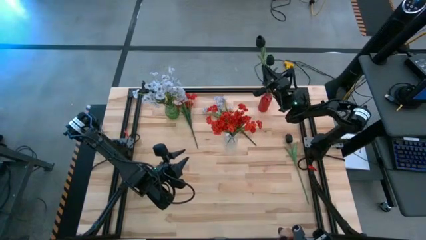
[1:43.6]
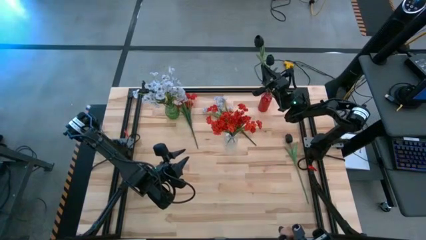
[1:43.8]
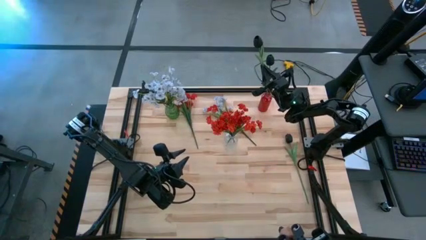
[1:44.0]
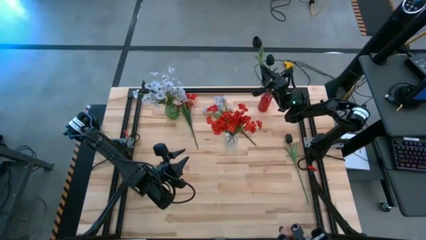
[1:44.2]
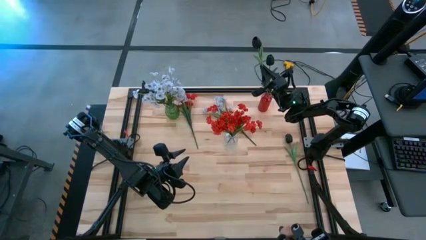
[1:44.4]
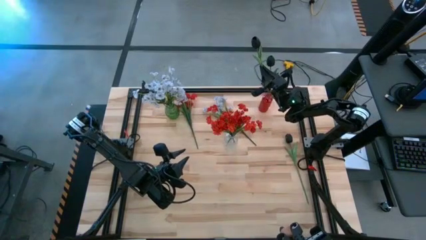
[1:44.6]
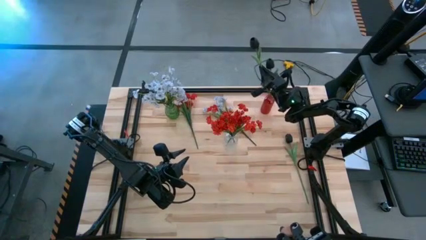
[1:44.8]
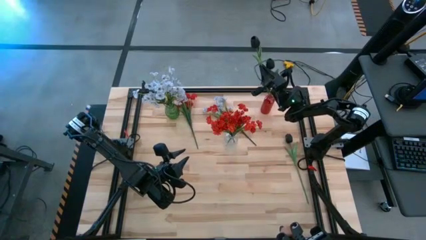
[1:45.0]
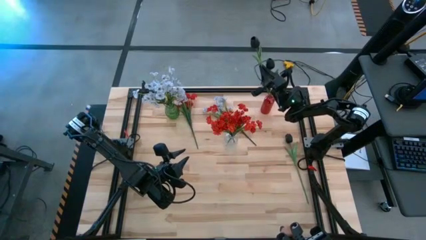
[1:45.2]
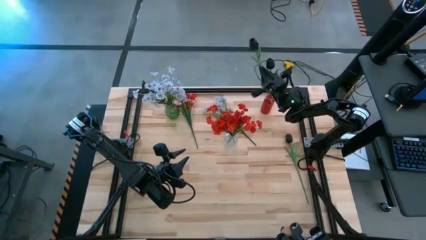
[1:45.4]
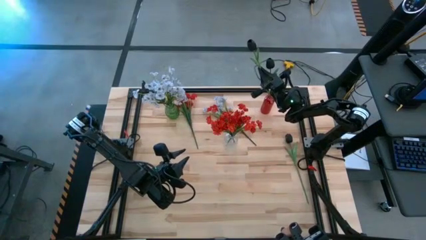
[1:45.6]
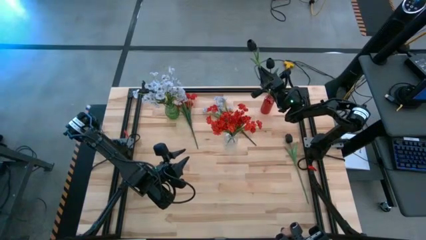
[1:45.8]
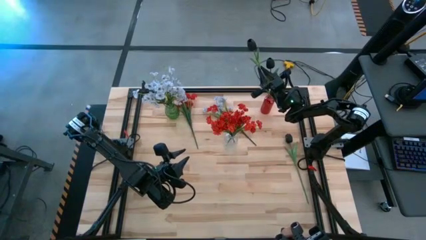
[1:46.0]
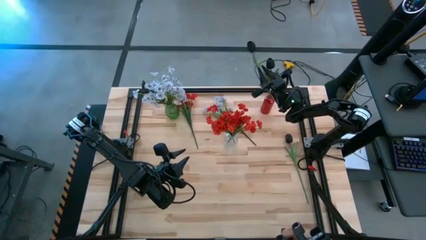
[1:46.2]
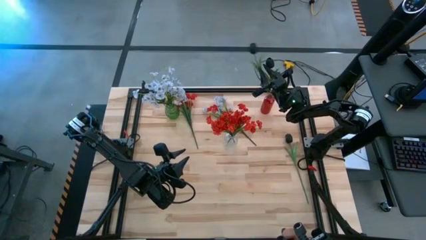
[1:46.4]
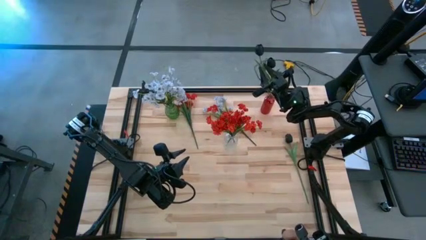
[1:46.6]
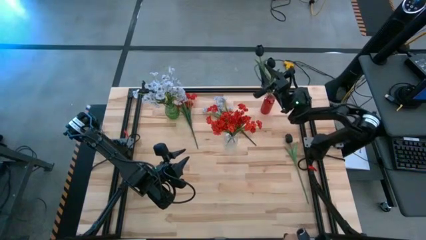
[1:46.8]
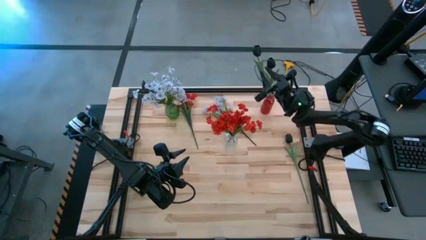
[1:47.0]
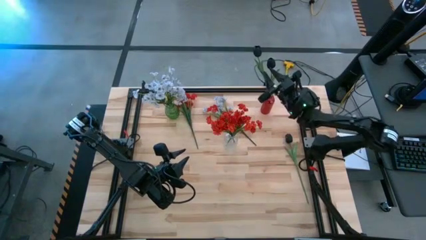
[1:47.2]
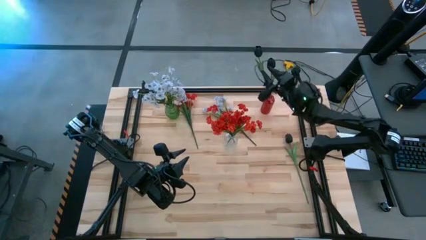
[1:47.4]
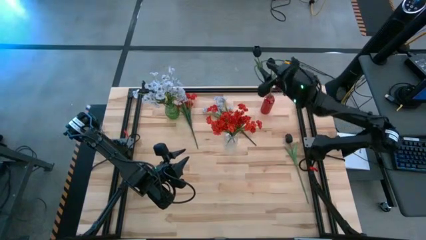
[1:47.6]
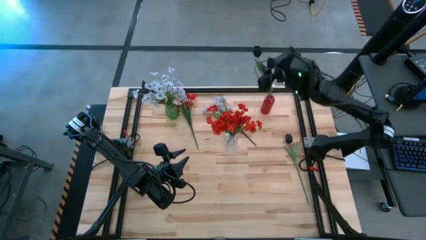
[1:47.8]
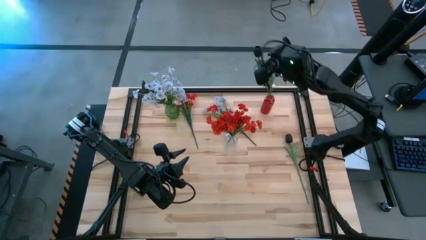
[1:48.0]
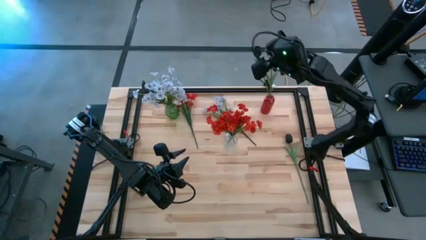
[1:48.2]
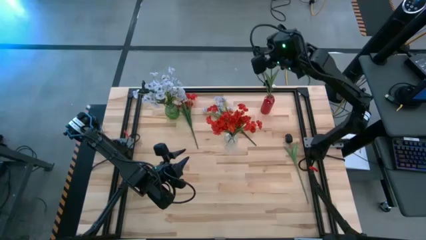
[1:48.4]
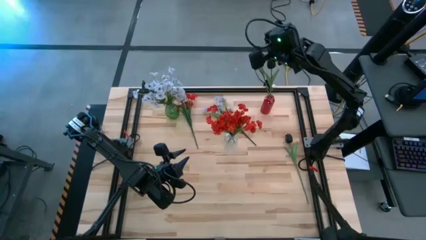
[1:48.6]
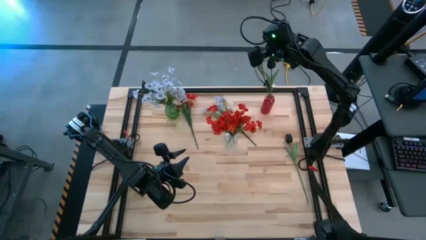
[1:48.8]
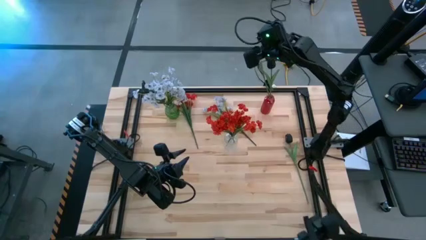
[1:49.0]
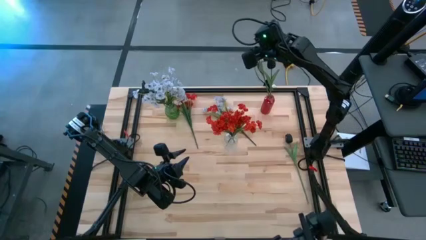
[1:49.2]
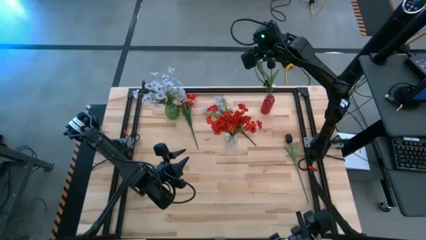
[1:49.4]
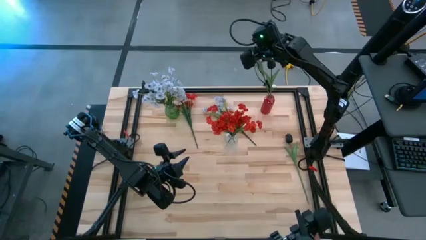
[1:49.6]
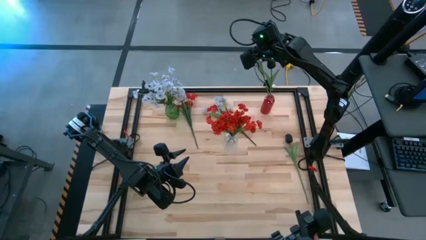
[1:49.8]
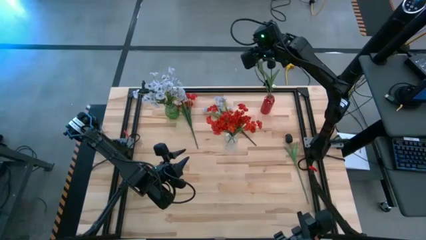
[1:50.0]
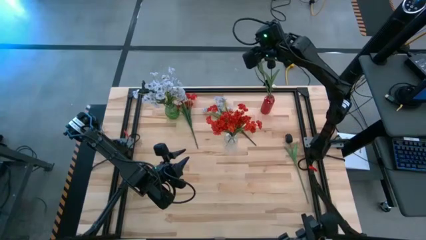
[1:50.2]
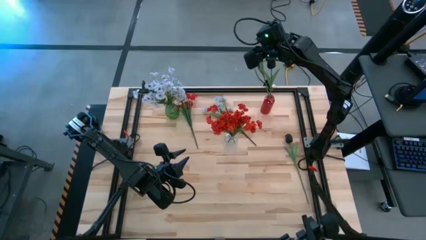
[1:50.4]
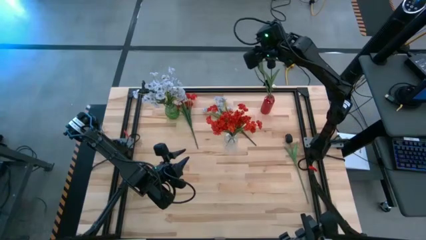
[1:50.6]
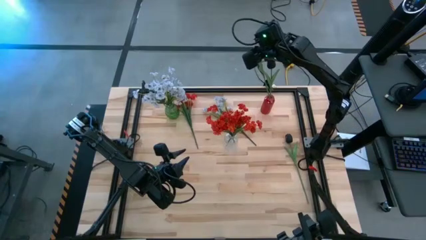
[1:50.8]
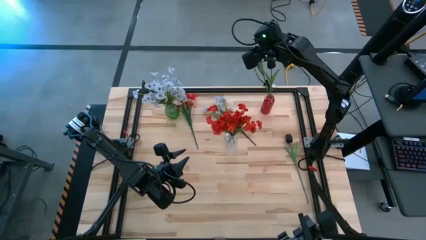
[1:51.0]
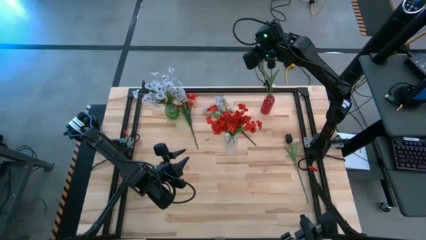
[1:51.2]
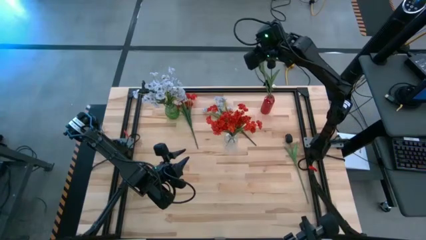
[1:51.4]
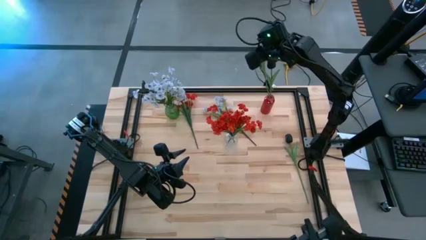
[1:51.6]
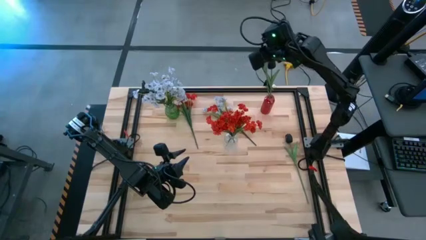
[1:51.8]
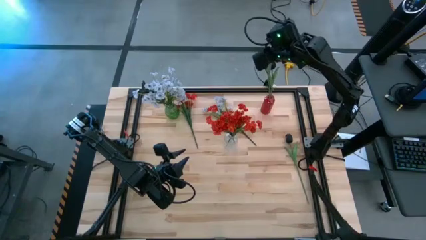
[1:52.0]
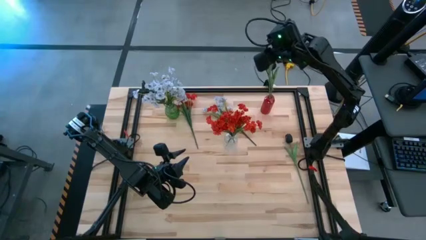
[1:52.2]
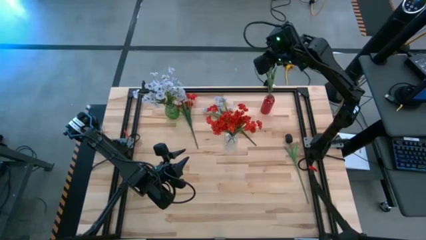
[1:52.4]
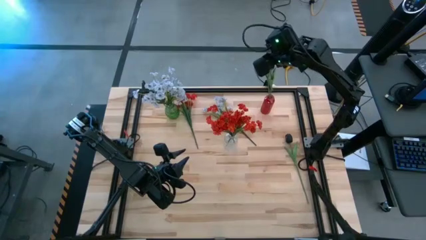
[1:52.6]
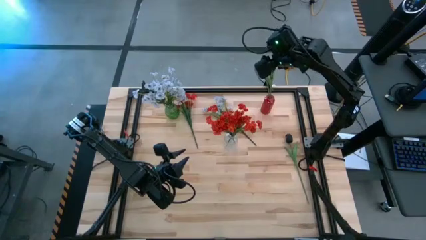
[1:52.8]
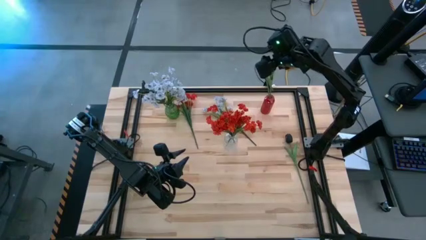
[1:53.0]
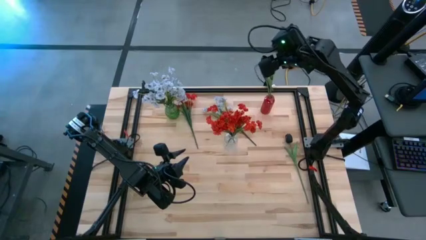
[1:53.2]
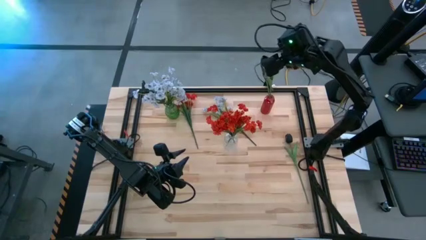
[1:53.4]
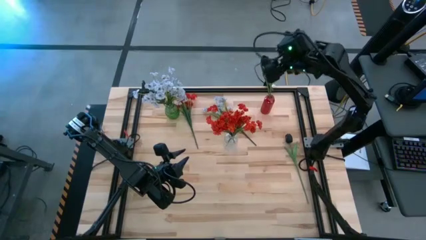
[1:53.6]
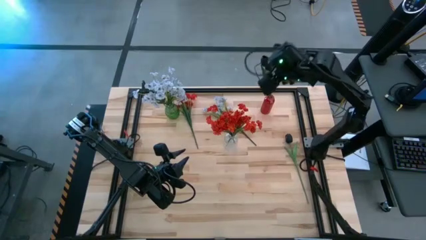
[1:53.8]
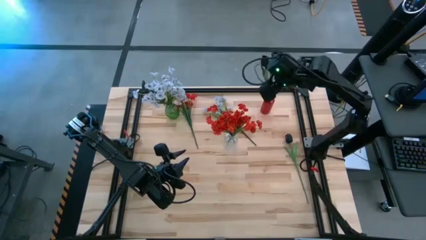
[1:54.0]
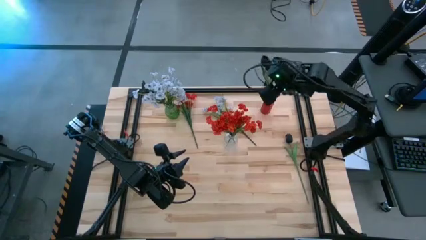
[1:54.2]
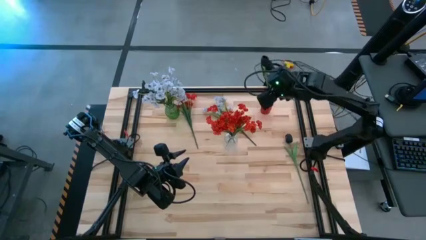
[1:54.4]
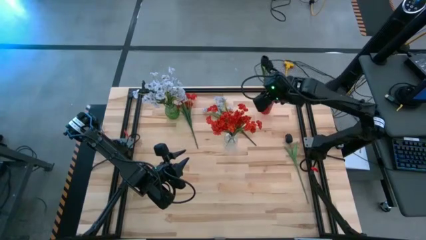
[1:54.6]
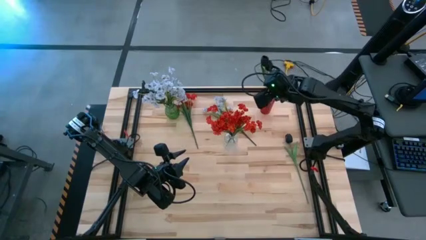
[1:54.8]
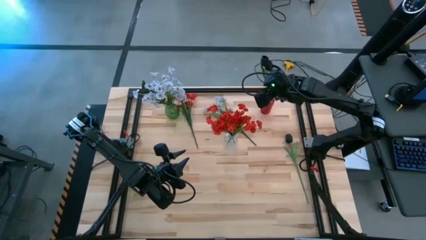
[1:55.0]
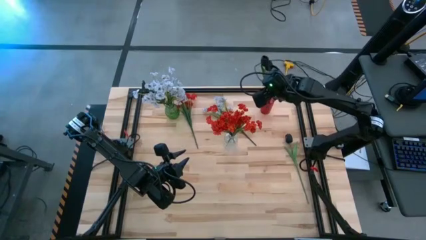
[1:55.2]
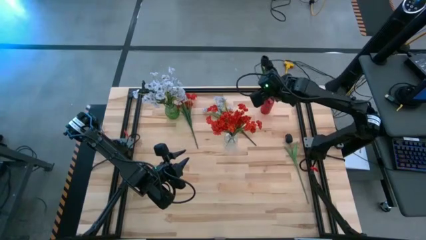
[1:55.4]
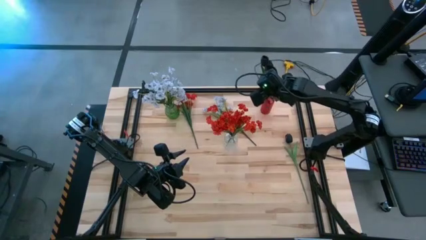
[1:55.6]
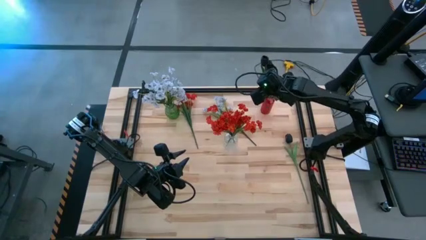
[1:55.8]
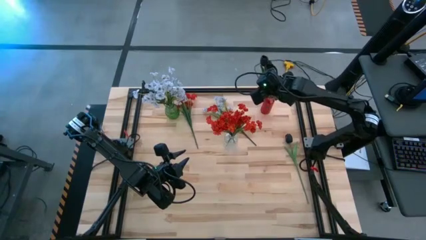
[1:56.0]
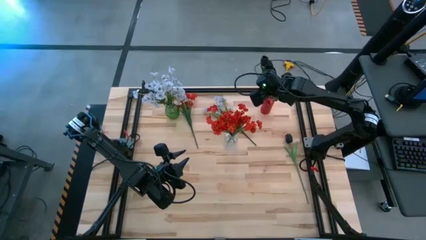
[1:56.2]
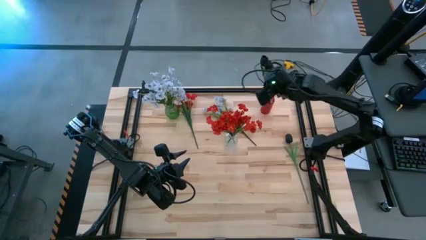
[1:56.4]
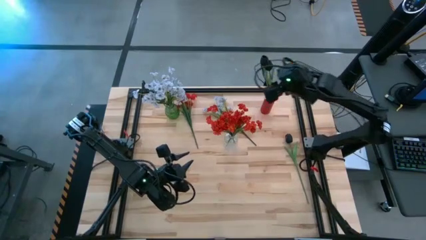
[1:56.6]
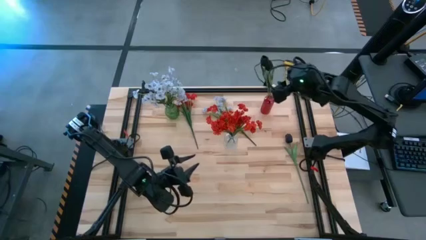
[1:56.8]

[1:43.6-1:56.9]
Task: Sort flowers into vase by color
Put the left black flower into the red vase
